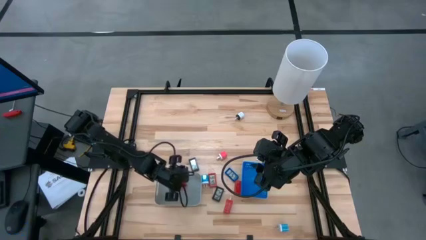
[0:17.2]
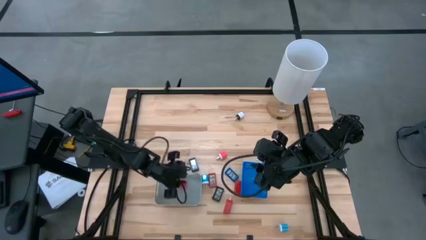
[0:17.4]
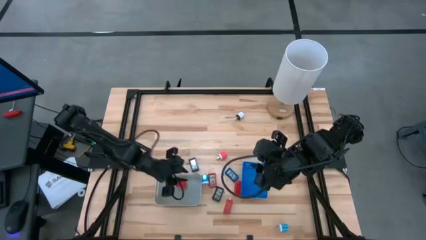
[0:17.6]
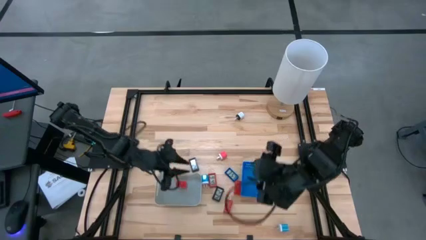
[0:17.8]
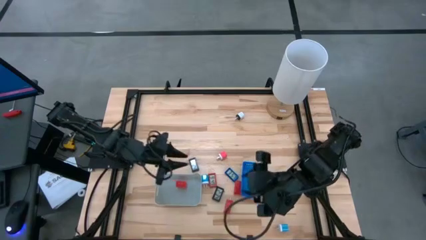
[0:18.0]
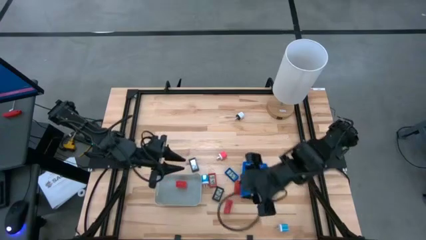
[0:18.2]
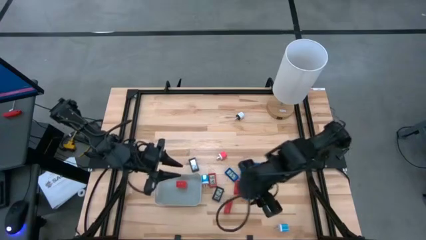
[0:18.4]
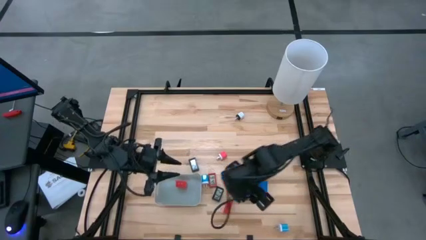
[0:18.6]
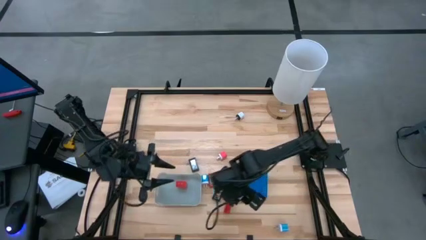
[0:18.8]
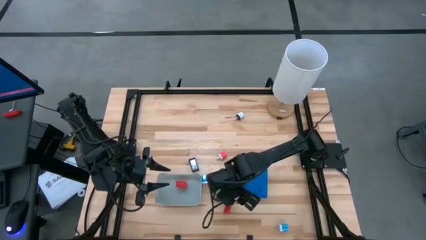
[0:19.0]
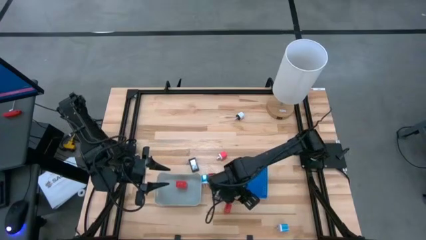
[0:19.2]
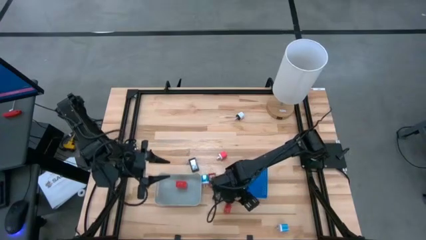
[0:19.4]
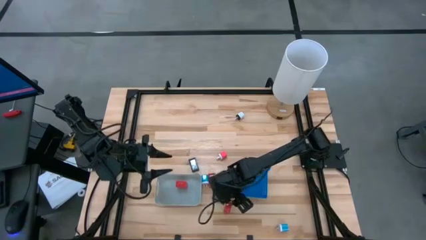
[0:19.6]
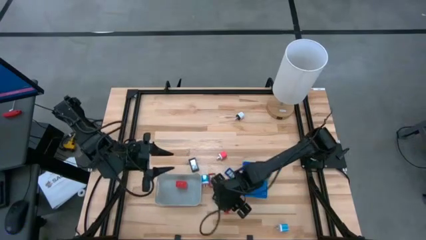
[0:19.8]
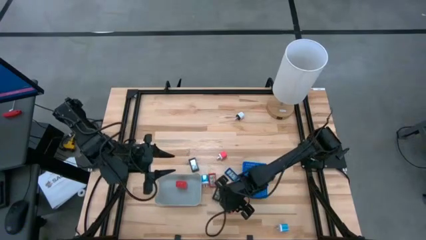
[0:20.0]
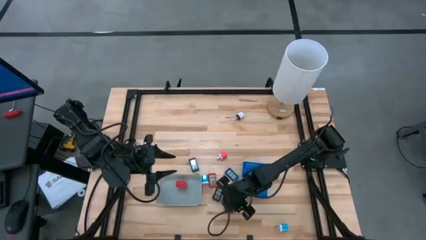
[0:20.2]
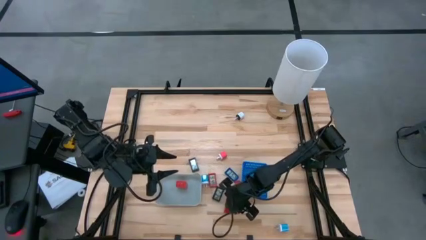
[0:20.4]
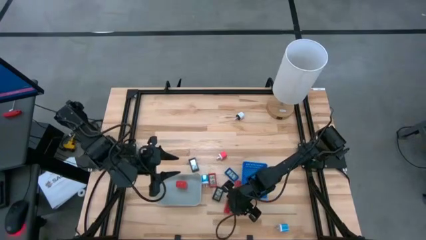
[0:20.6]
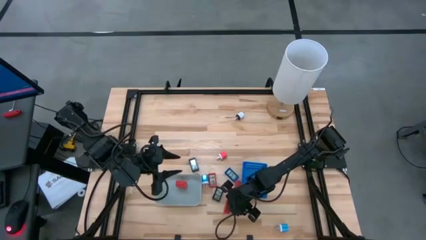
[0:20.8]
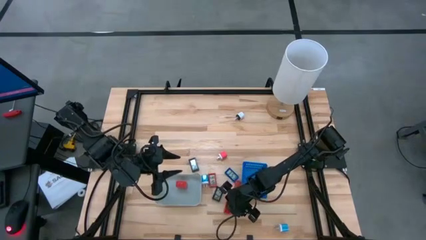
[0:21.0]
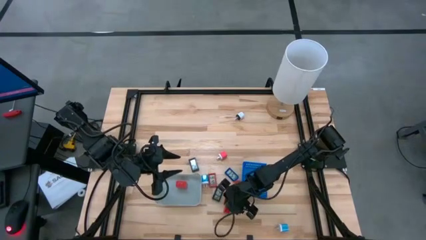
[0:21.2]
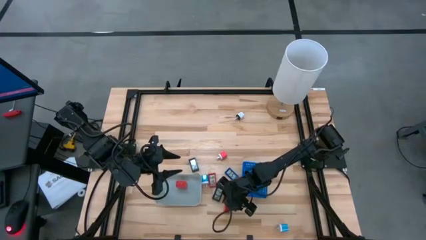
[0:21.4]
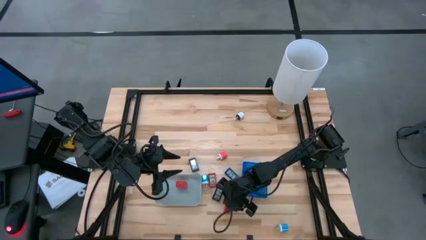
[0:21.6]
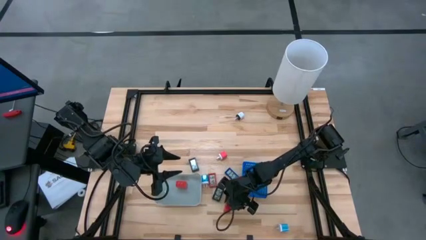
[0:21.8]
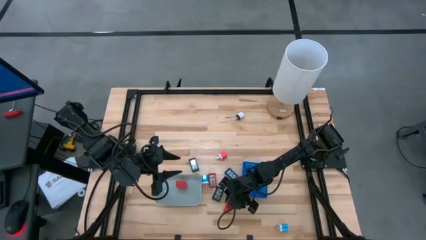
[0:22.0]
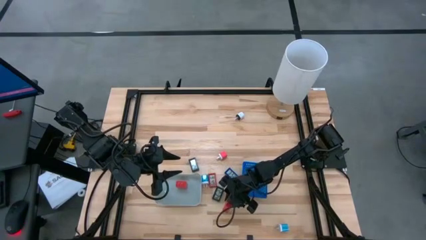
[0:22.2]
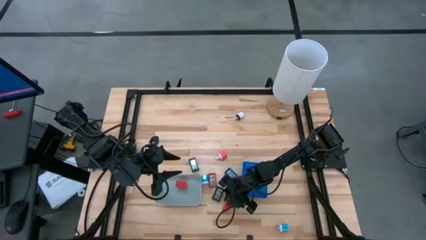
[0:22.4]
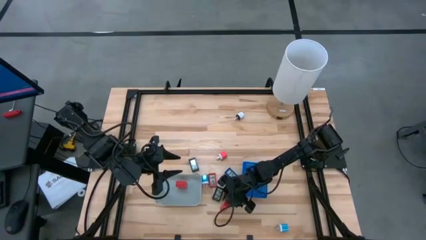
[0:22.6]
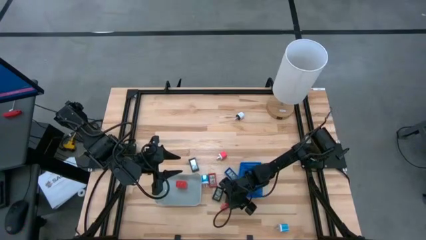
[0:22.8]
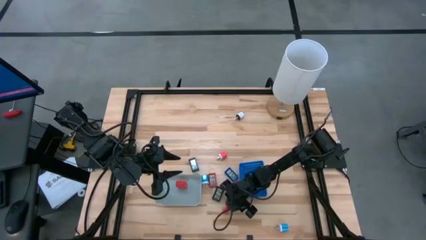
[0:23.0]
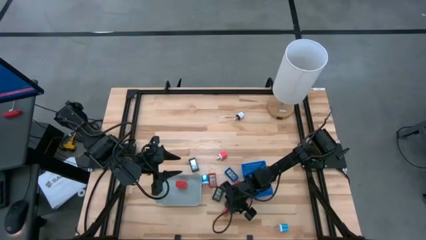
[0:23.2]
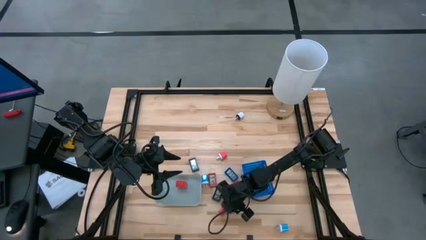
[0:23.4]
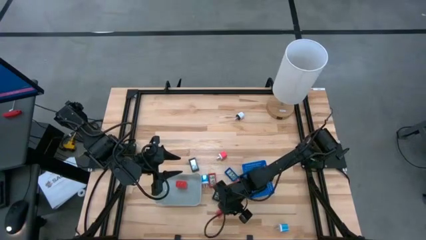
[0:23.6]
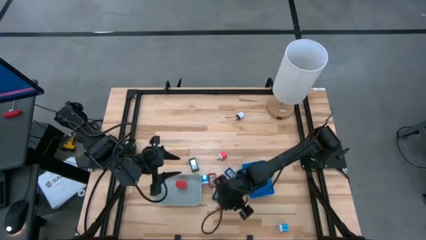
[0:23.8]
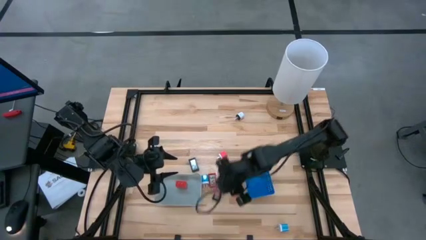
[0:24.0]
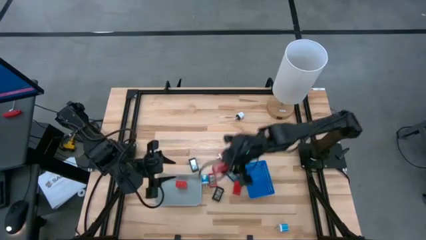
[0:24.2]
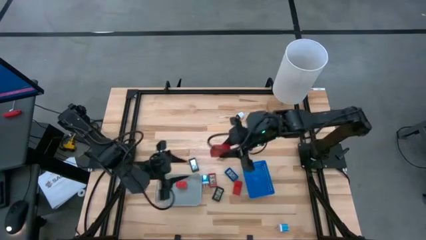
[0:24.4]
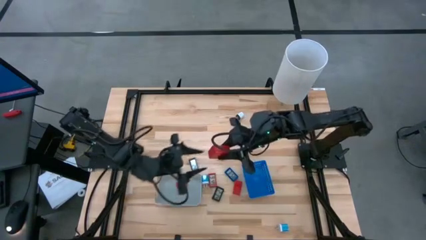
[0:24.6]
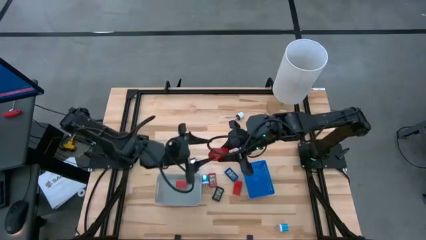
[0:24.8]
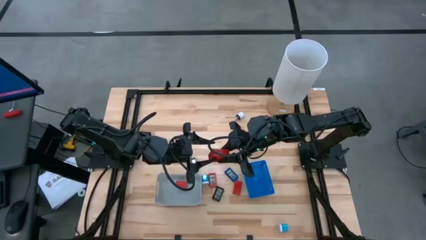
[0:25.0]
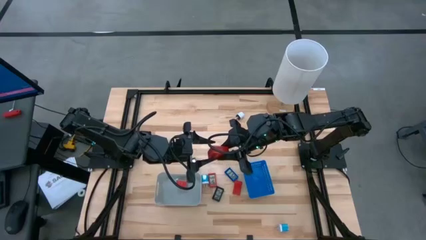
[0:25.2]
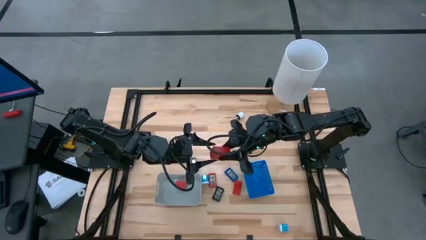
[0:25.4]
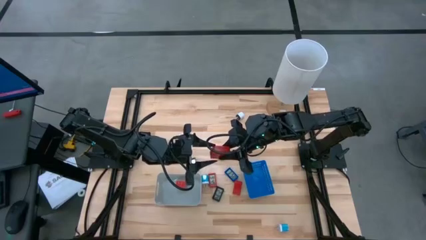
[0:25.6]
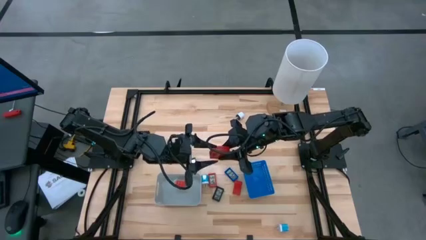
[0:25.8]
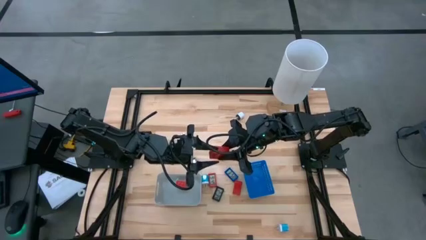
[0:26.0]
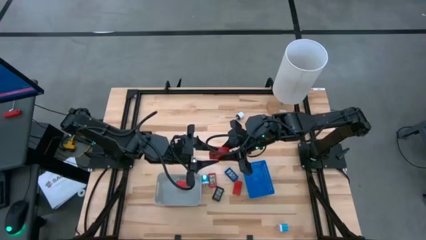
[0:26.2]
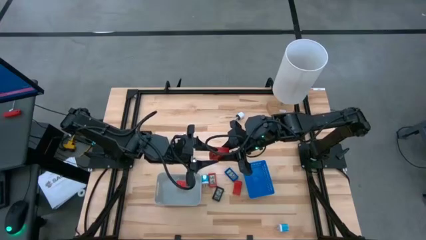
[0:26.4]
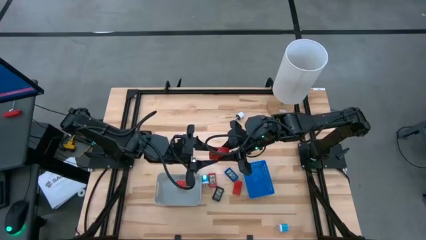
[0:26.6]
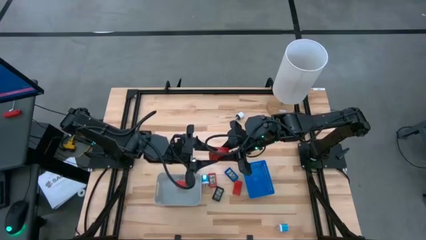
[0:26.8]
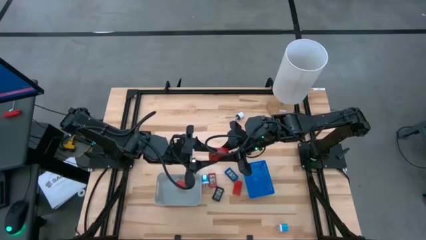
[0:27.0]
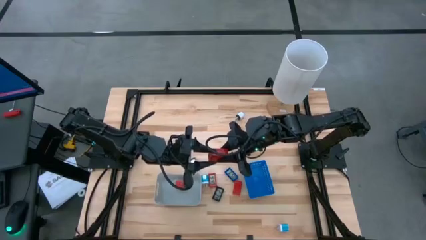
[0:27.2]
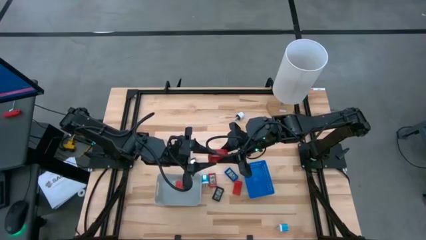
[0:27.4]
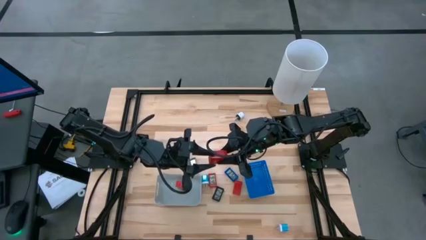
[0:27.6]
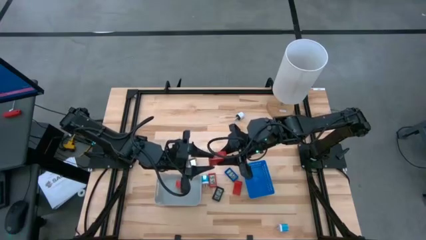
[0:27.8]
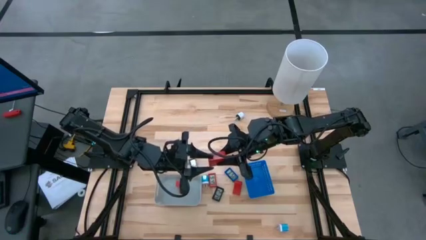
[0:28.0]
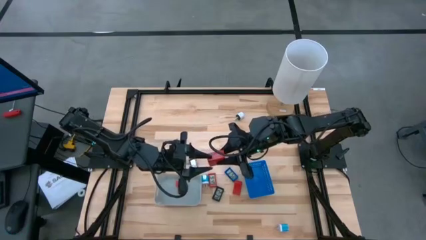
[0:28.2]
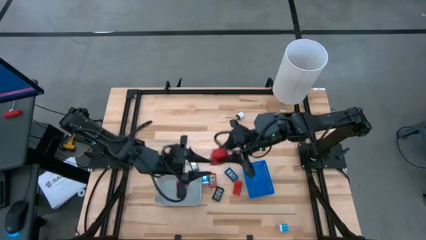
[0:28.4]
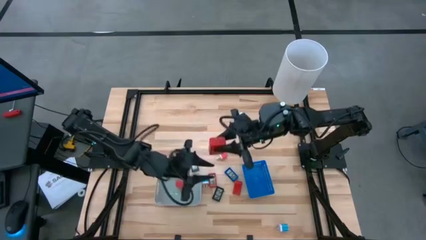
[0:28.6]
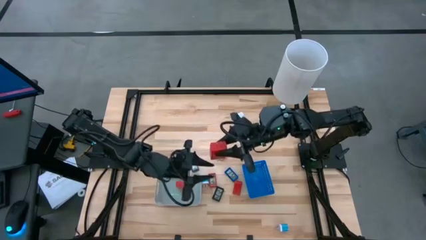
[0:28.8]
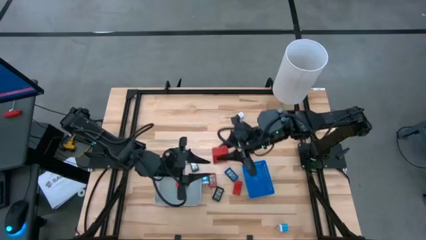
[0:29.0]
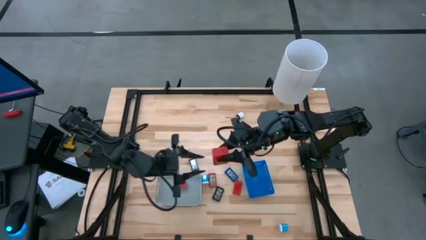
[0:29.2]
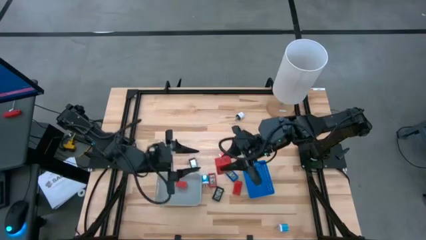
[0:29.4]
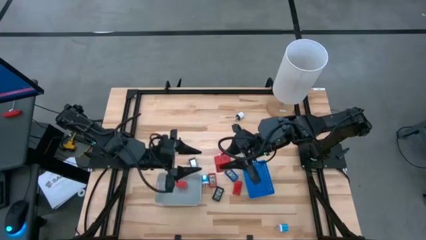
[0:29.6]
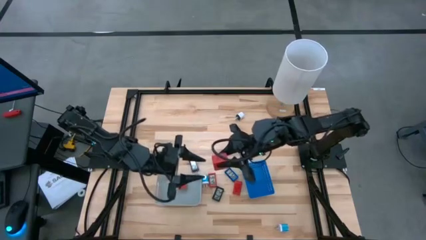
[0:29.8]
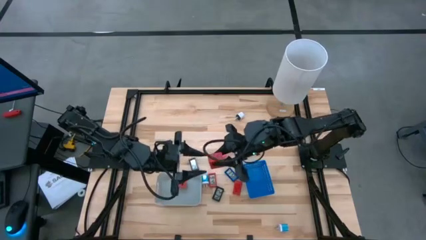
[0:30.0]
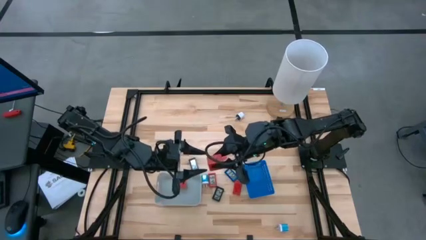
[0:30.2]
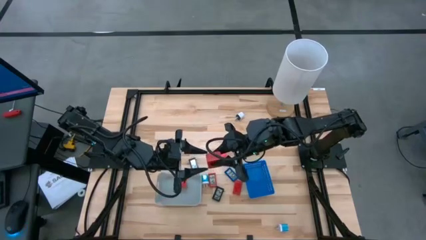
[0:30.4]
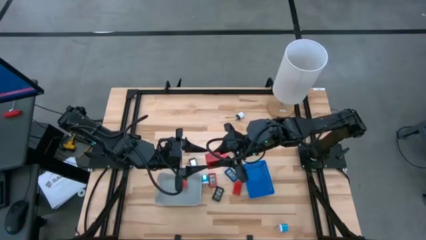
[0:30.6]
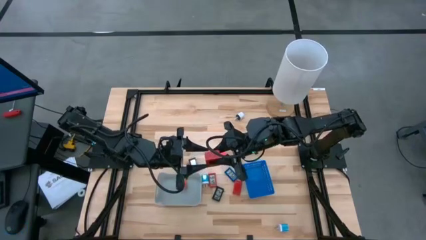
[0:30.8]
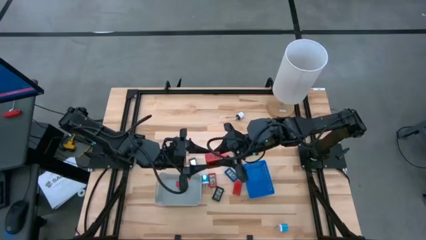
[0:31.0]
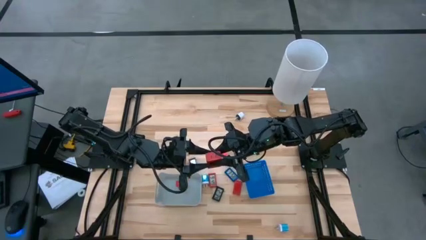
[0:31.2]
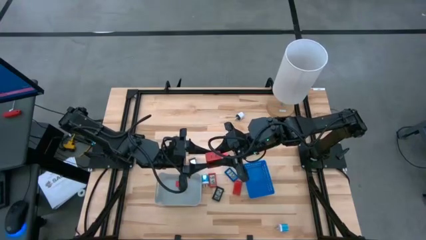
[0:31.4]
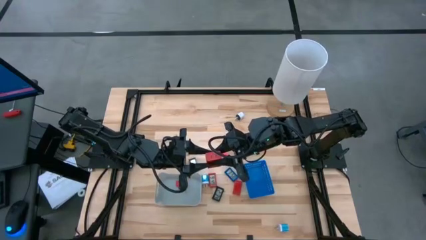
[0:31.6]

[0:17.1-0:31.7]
Task: Pick & Place Office items
Put the red charger adapter into the gray bin

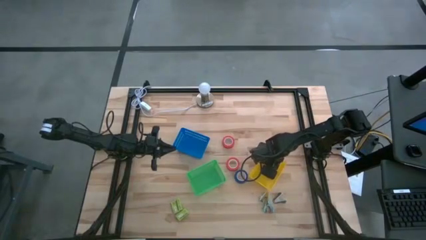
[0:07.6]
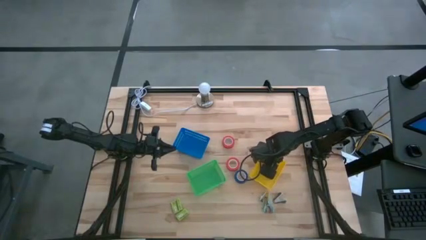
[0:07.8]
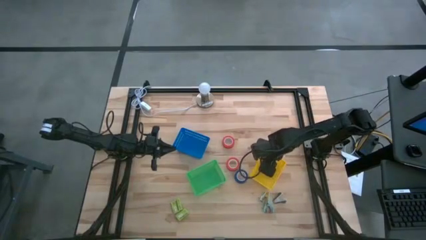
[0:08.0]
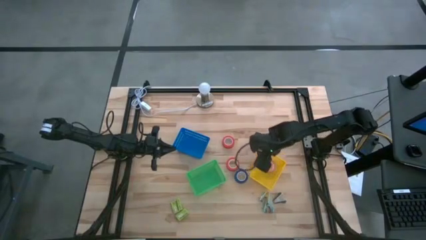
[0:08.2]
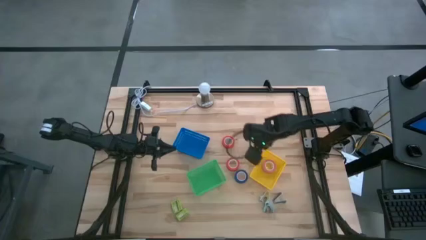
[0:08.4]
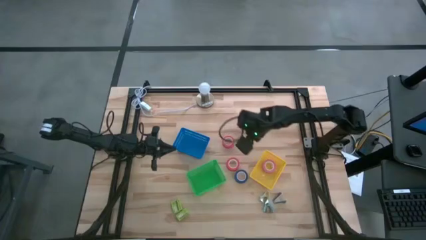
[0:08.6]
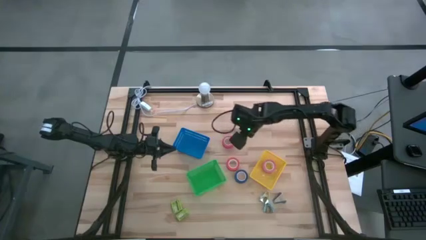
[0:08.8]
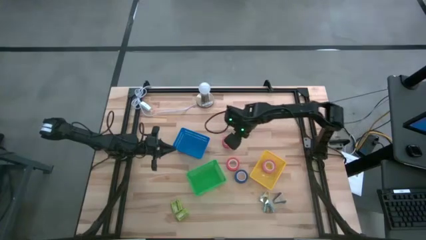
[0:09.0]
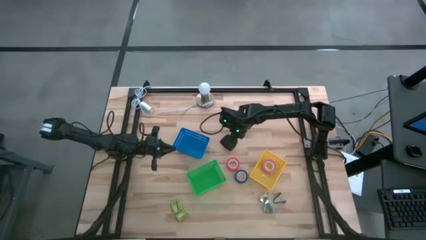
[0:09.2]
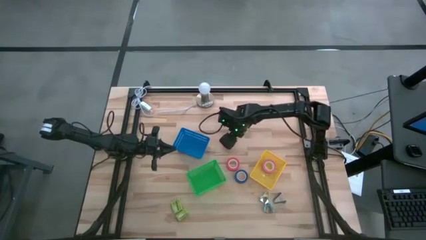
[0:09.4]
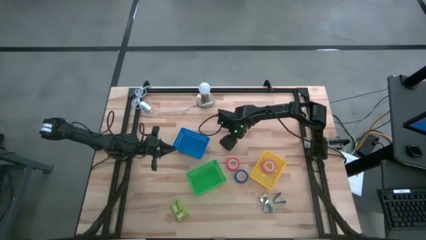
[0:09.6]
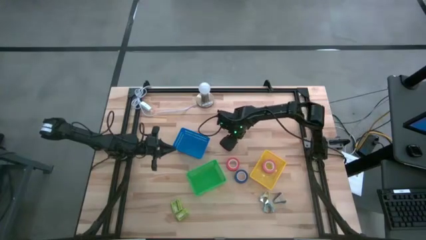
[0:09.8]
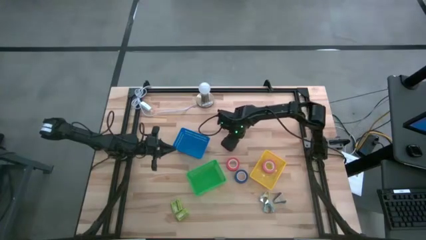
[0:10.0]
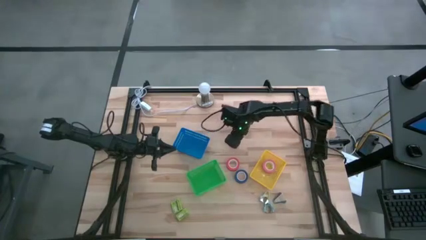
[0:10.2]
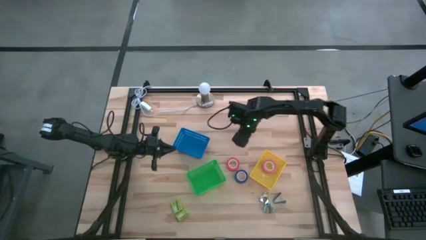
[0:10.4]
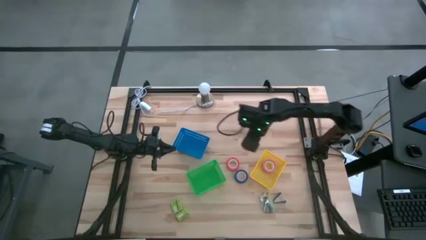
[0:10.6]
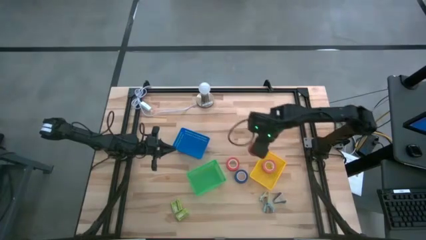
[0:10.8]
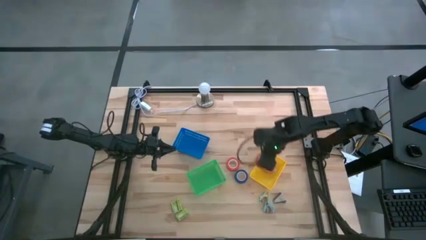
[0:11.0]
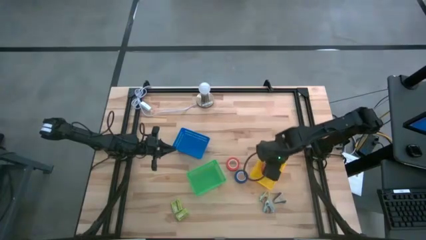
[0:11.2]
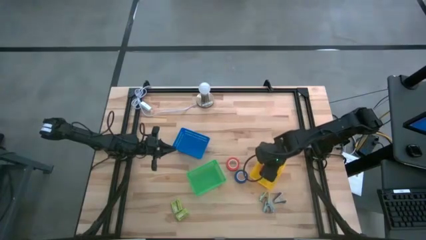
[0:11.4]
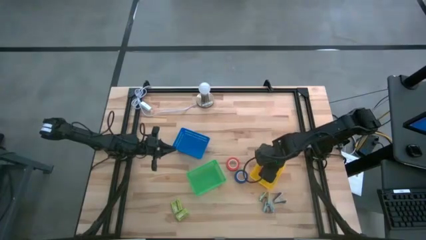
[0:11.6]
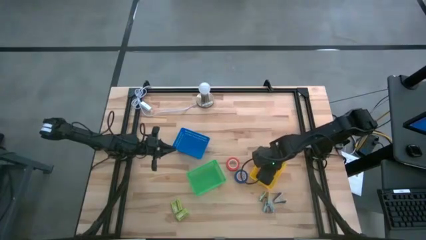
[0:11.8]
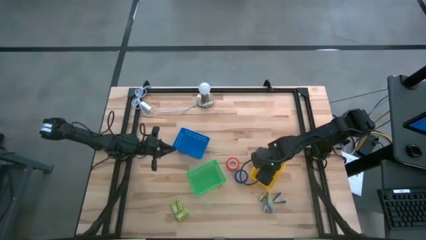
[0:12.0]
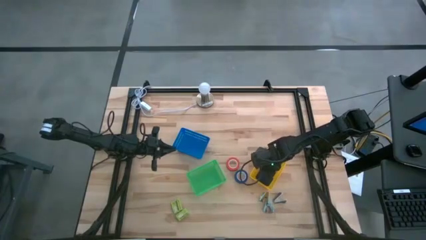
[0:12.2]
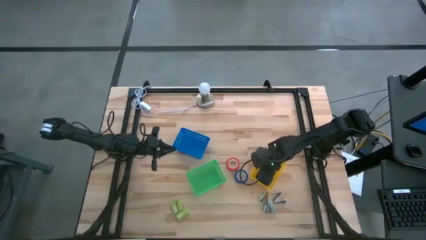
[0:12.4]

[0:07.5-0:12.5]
Task: Pick and place Stapler, Stapler remover, tape
Put the top red tape into the yellow bin
